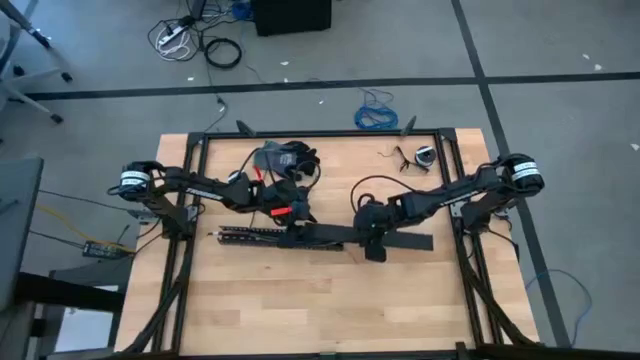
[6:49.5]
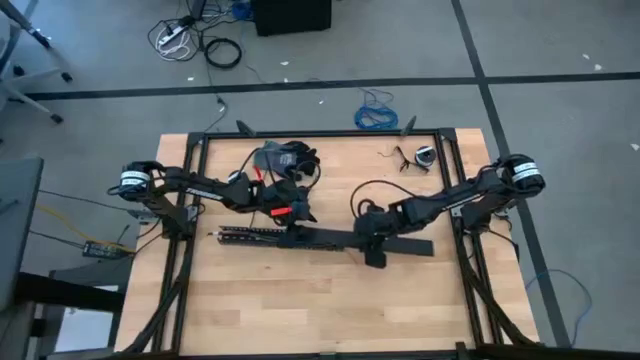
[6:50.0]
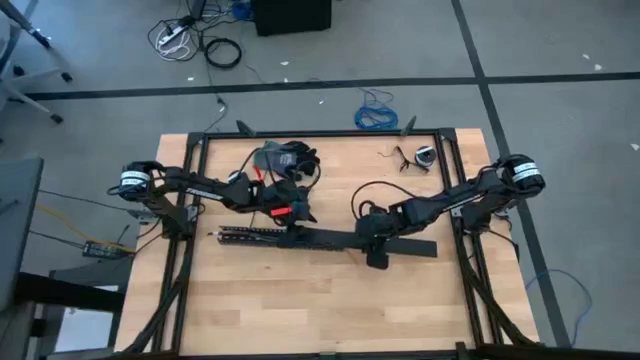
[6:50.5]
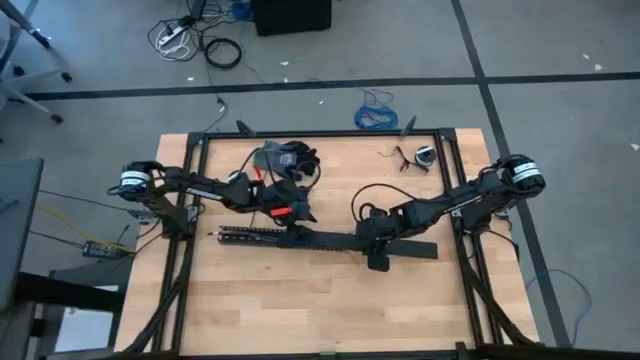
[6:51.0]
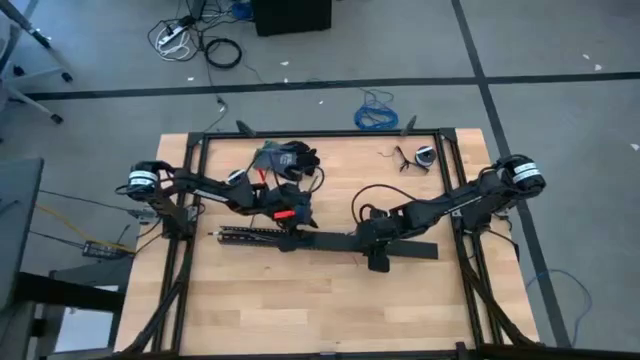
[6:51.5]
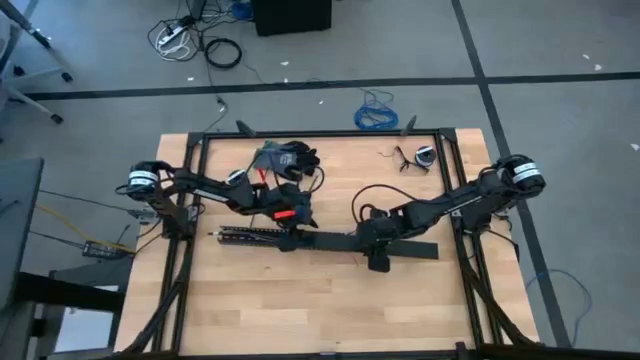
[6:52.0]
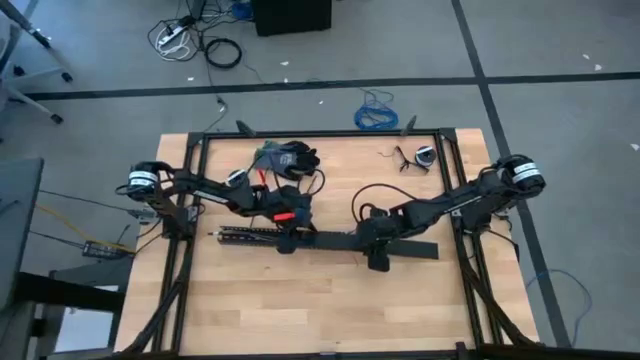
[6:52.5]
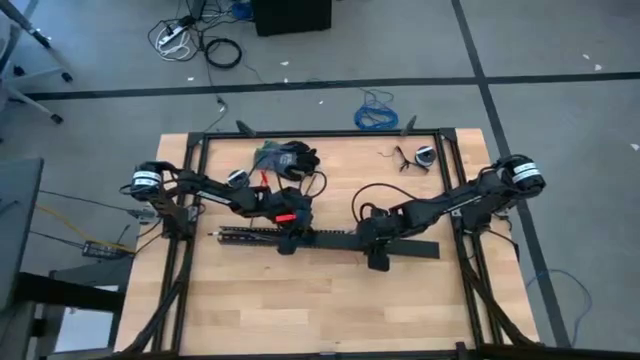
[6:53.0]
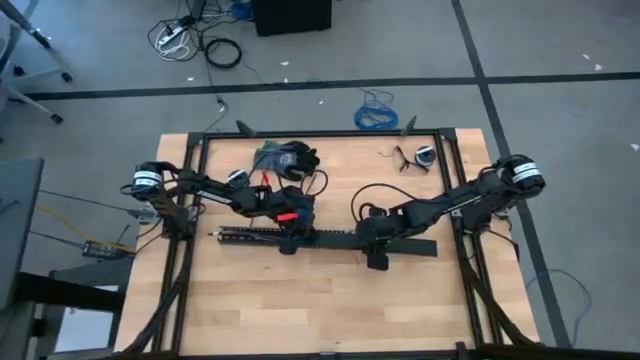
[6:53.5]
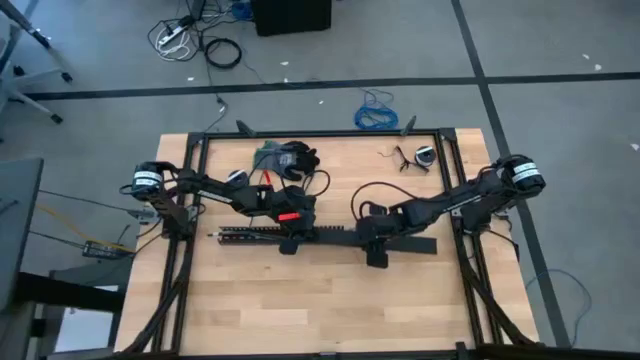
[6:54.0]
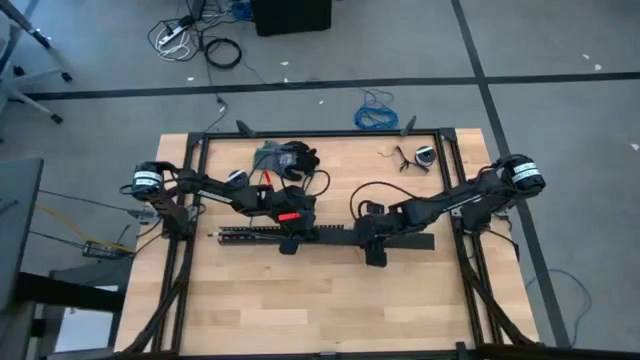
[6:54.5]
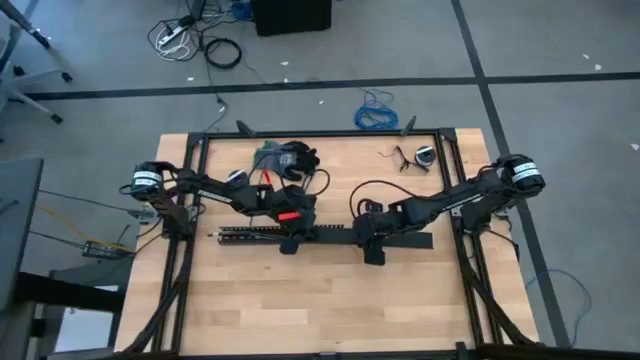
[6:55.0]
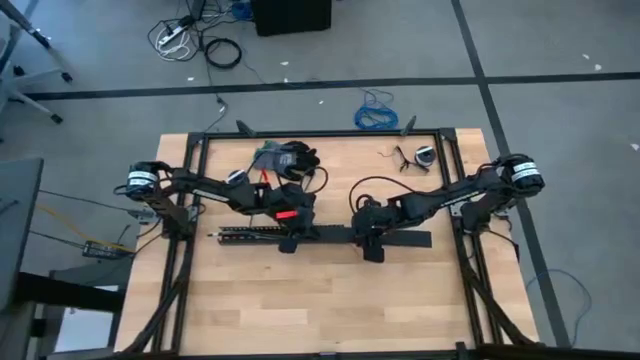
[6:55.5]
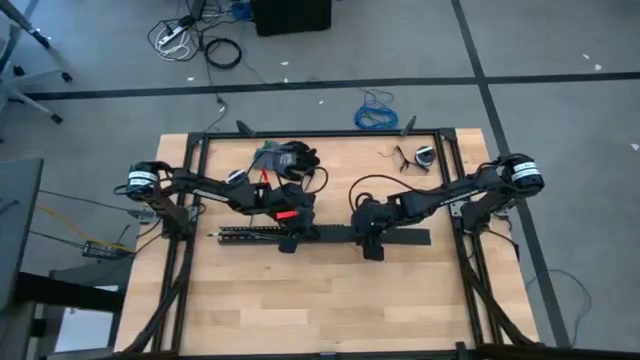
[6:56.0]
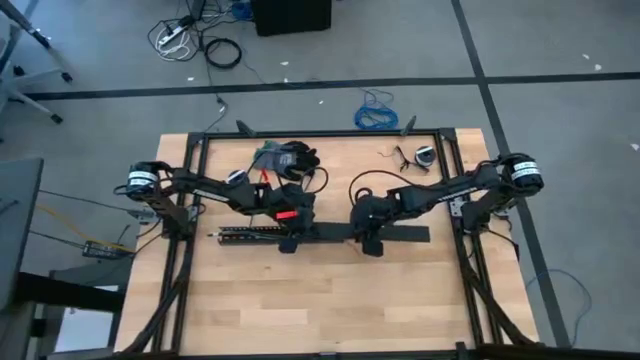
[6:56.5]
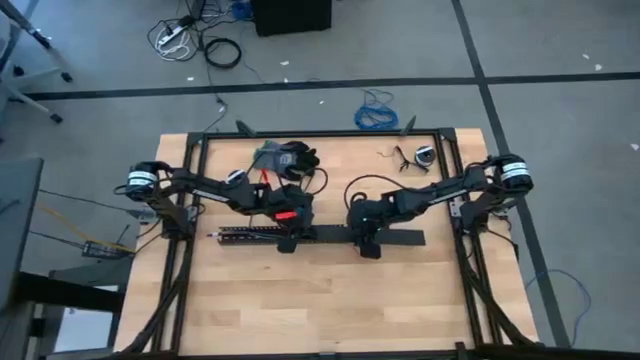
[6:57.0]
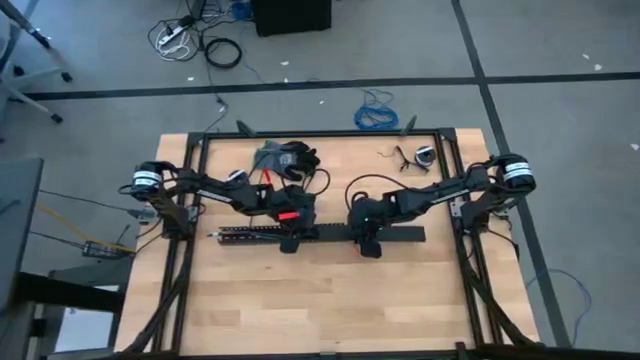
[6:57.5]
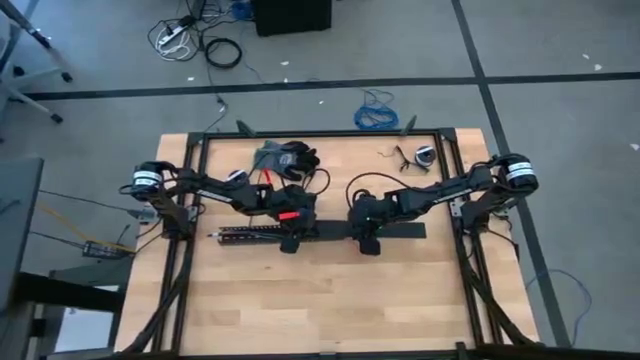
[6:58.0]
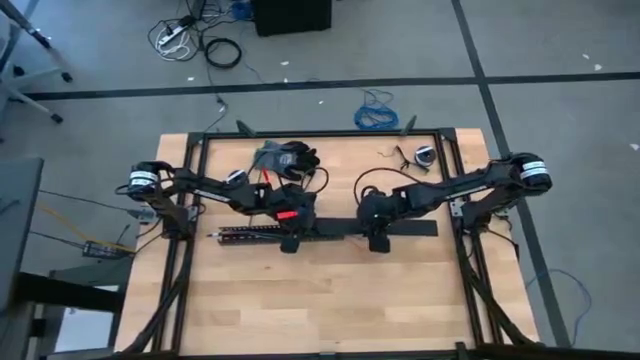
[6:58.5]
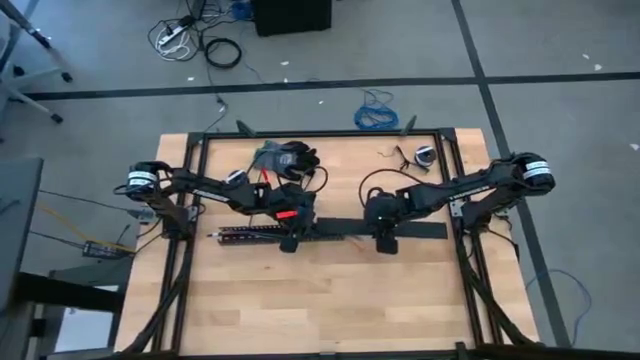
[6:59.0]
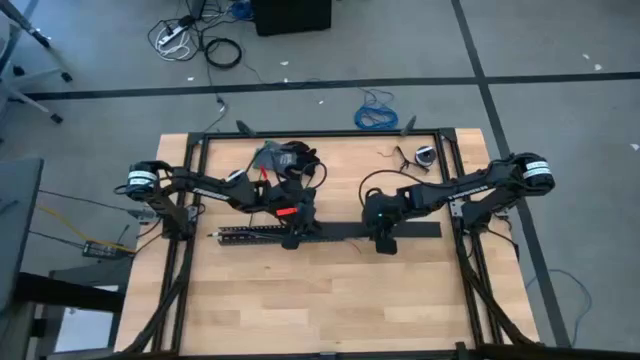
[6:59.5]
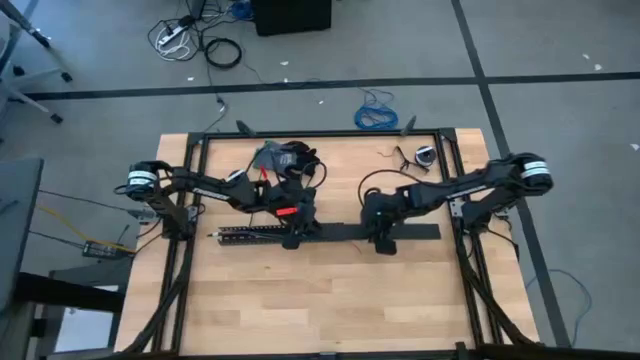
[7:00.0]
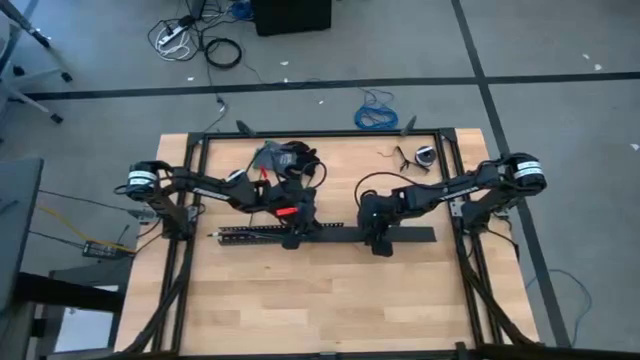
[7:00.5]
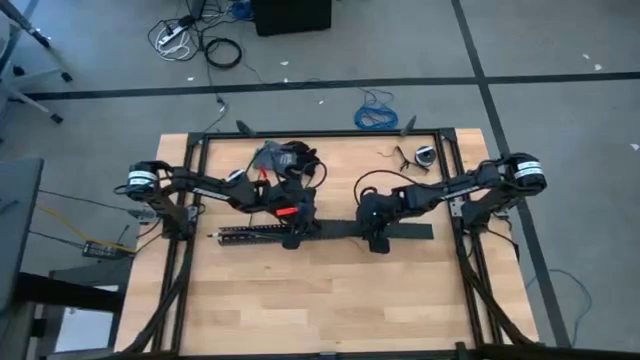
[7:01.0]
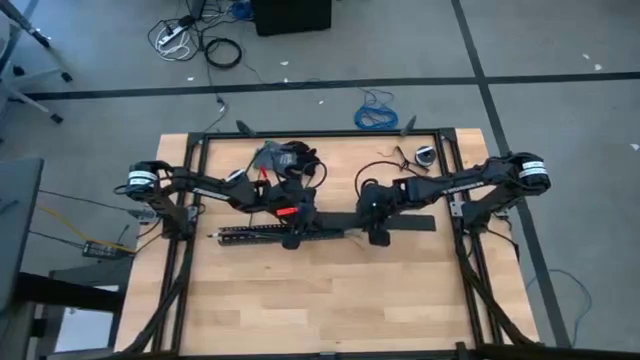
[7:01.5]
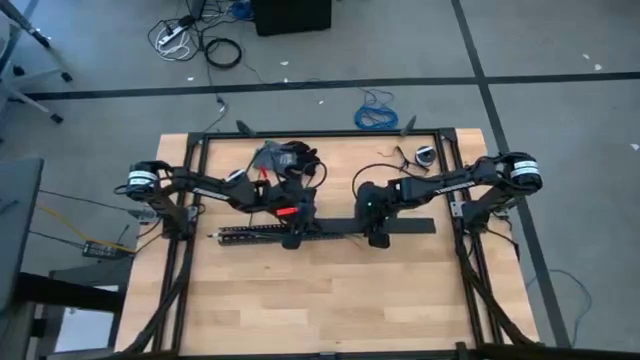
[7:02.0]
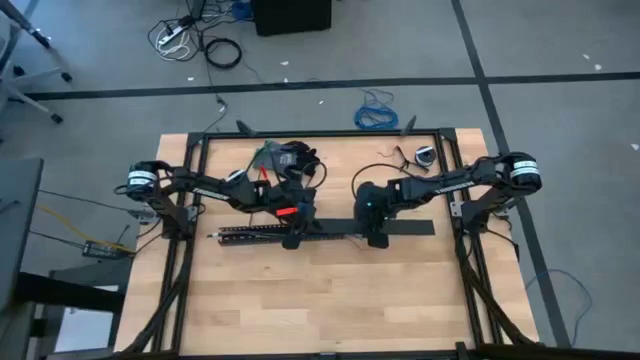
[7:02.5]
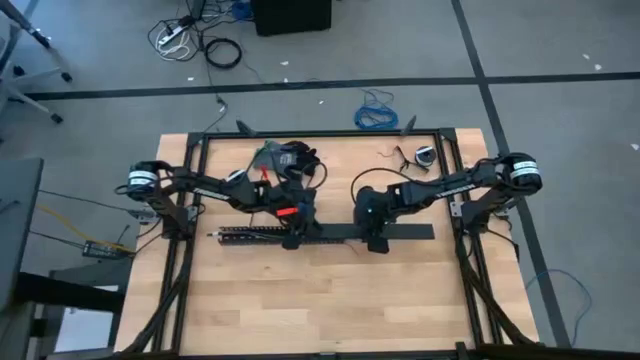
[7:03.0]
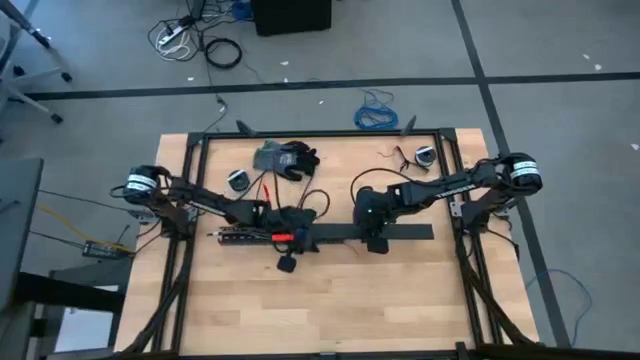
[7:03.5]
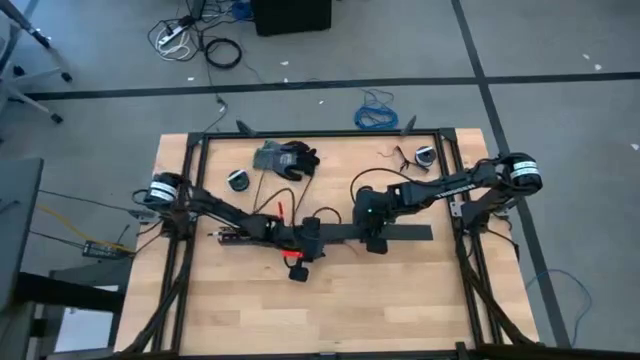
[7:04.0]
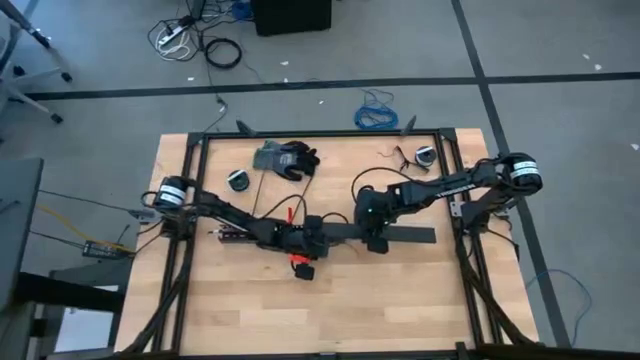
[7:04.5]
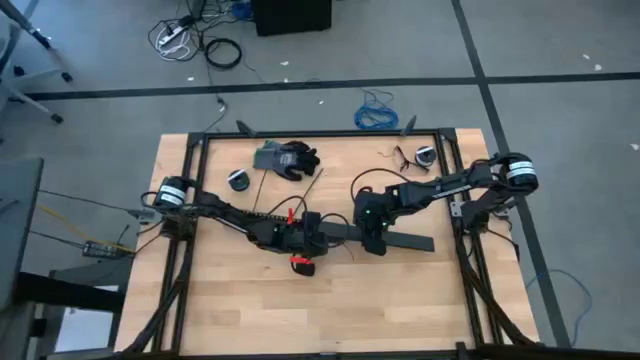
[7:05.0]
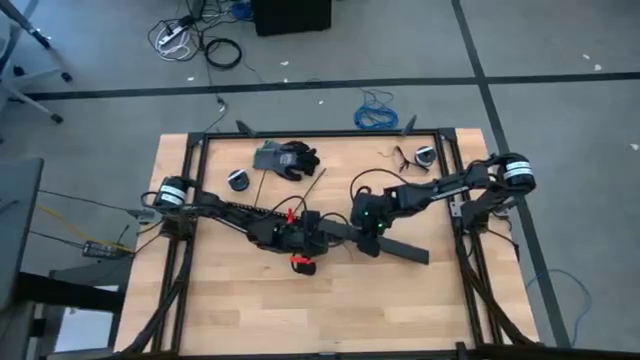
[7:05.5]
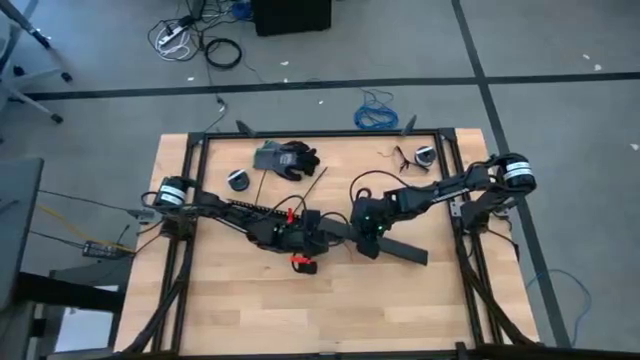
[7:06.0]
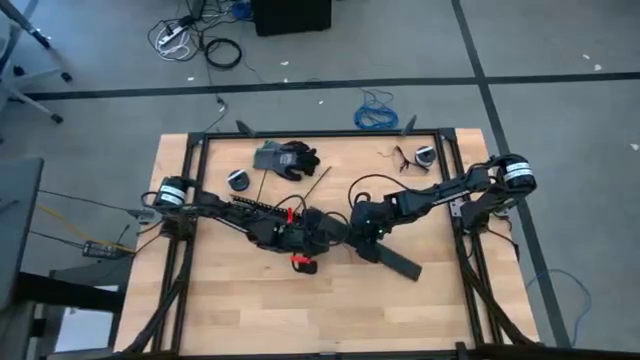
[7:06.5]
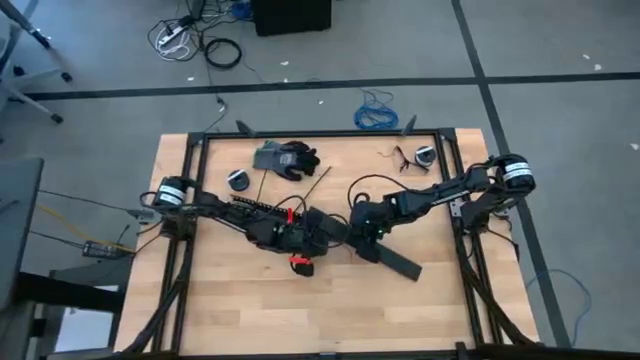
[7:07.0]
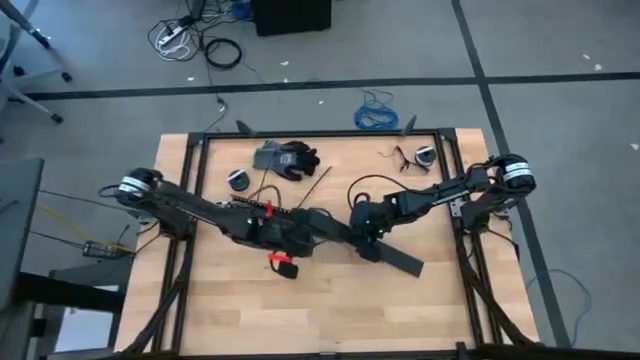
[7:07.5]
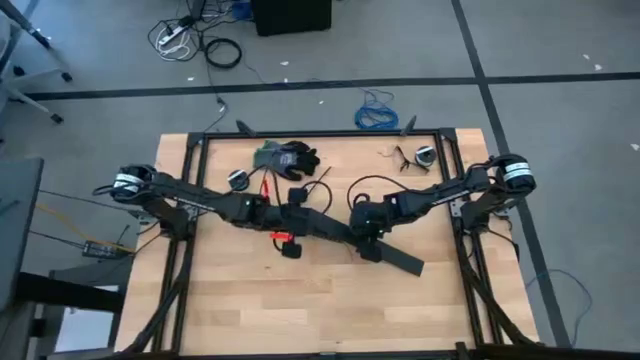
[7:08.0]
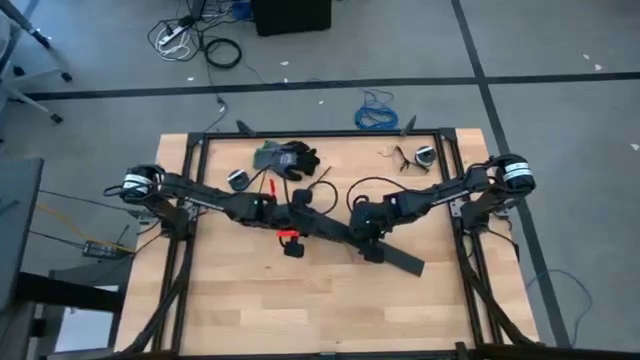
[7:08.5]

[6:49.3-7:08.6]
Task: Ziptie cables
Close the black cable duct cover

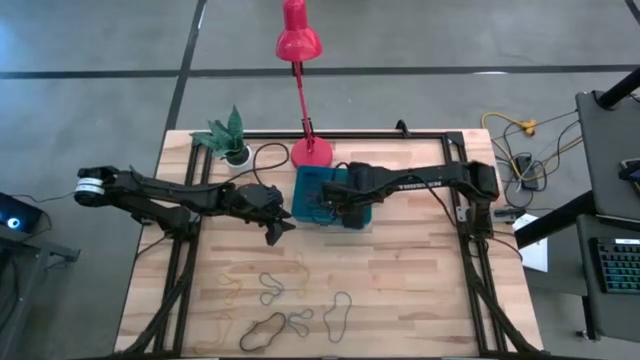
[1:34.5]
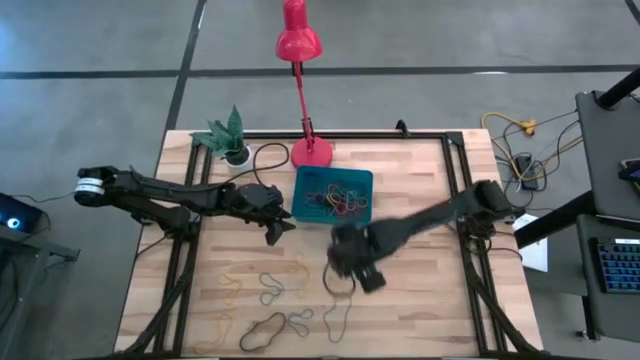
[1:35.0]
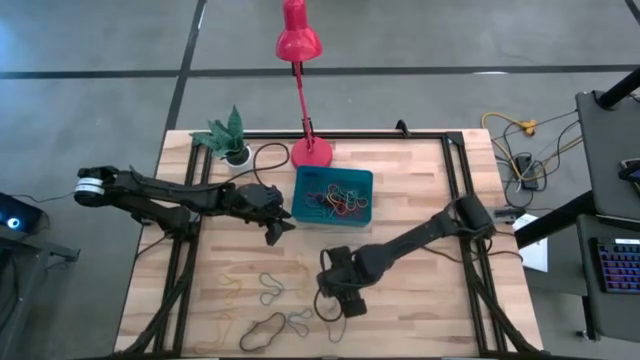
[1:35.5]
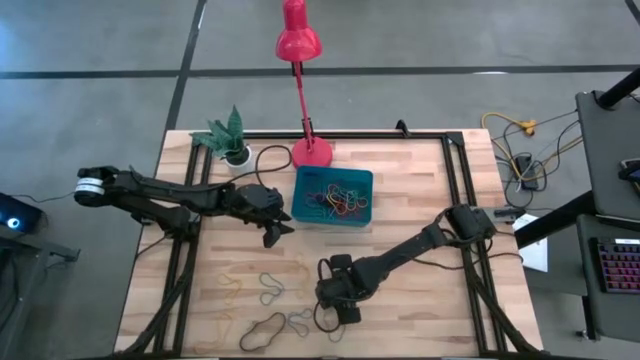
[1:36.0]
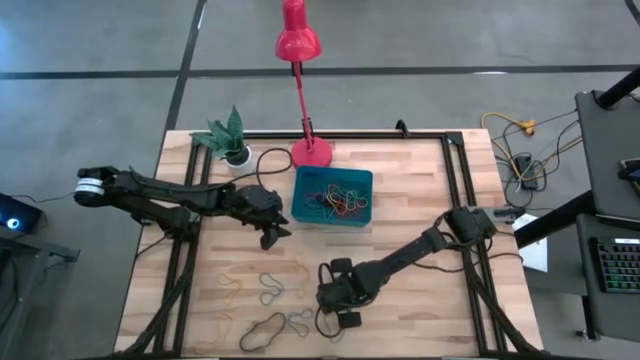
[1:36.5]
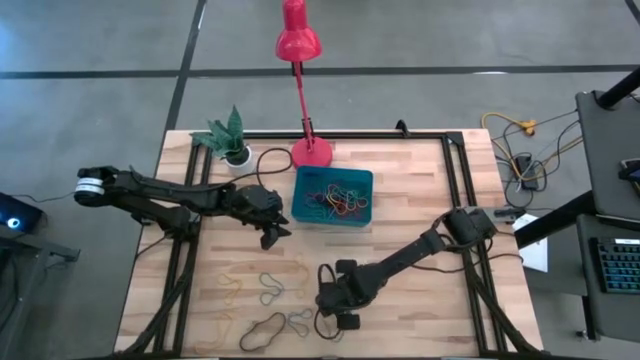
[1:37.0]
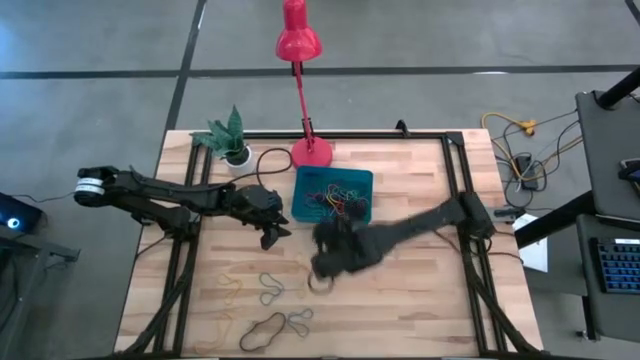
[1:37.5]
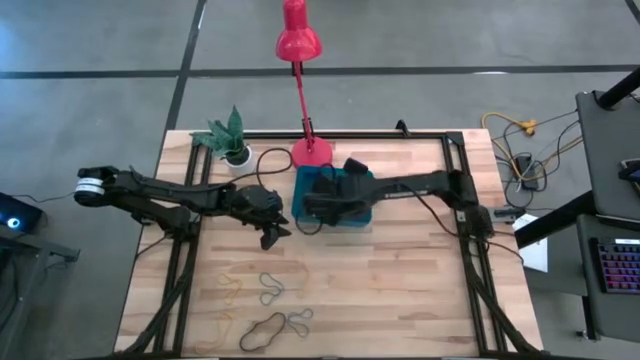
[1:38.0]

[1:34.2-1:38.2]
Task: Pick and place rubber bands into bin
Put the blue rubber band into the blue bin
